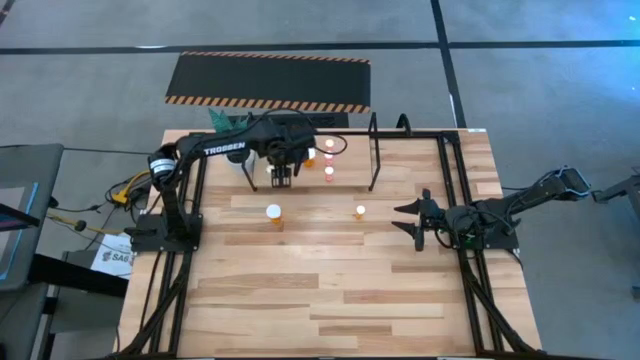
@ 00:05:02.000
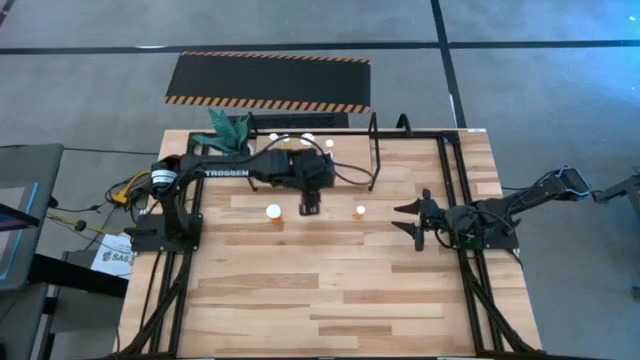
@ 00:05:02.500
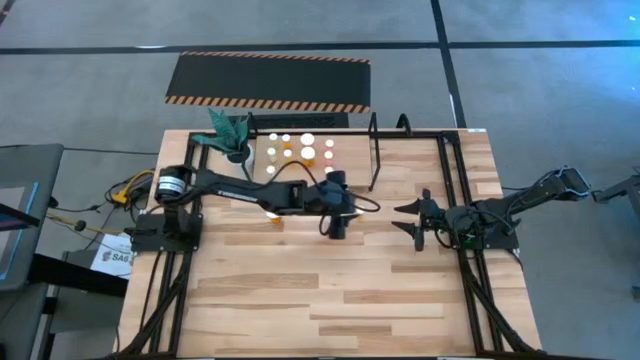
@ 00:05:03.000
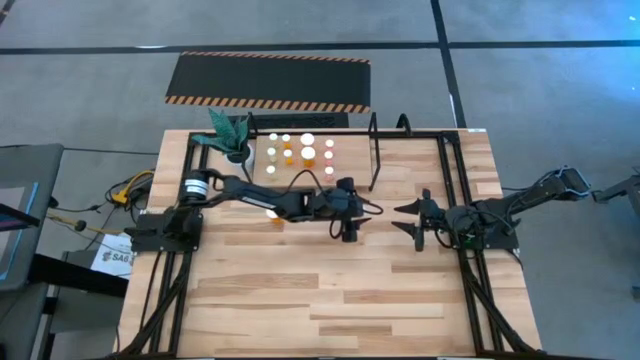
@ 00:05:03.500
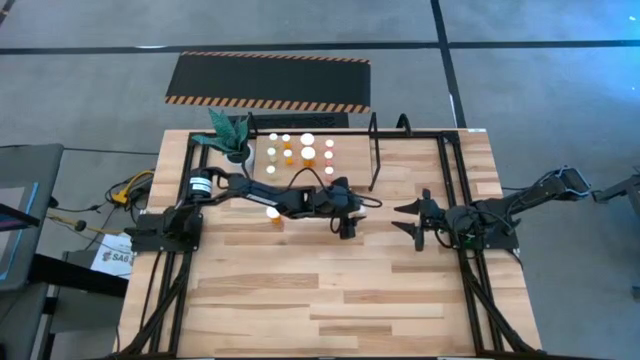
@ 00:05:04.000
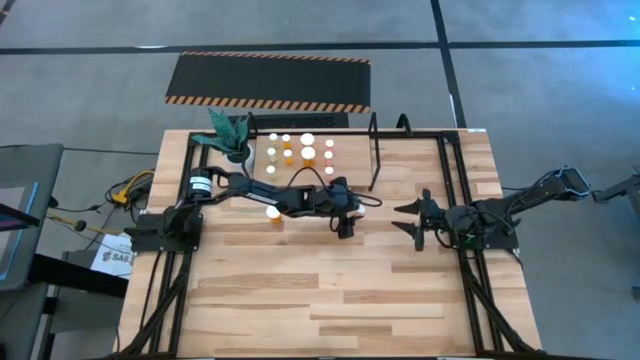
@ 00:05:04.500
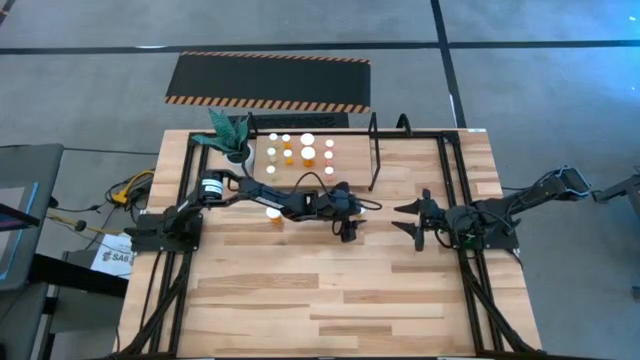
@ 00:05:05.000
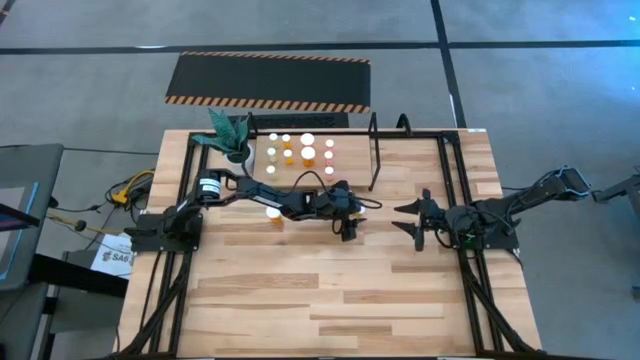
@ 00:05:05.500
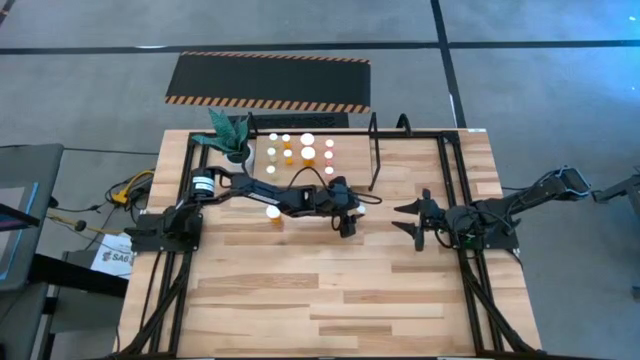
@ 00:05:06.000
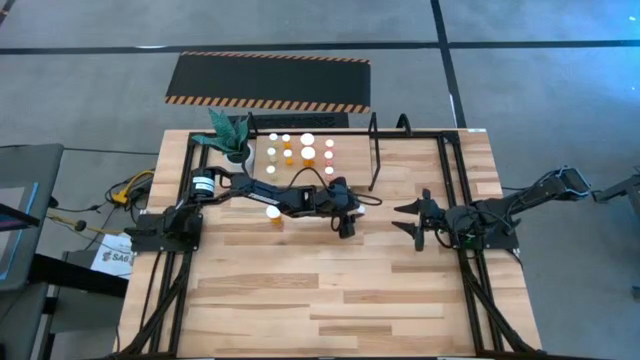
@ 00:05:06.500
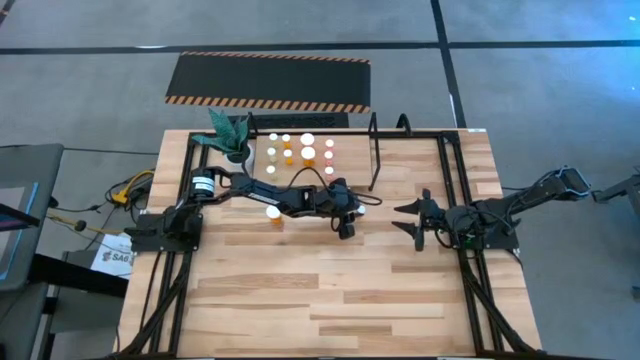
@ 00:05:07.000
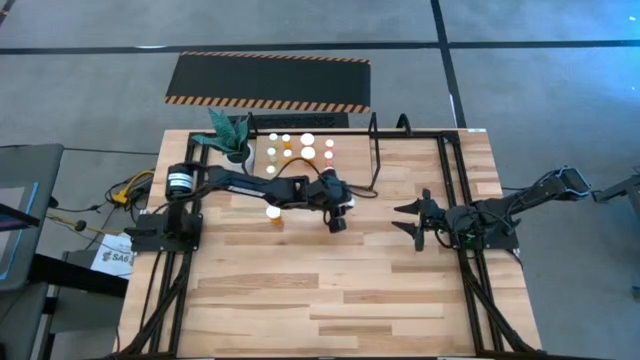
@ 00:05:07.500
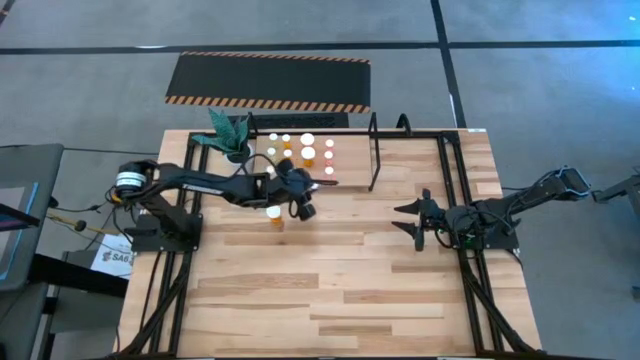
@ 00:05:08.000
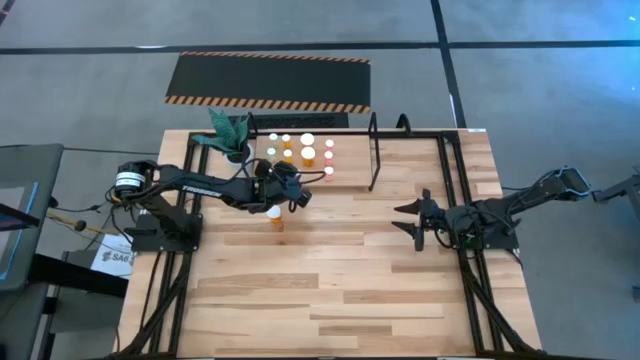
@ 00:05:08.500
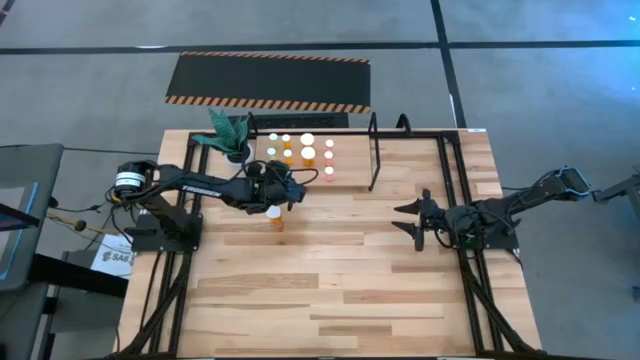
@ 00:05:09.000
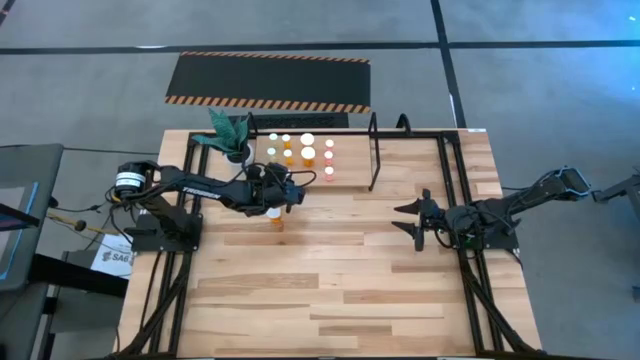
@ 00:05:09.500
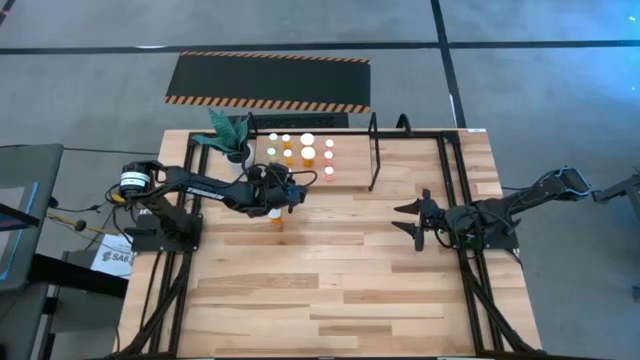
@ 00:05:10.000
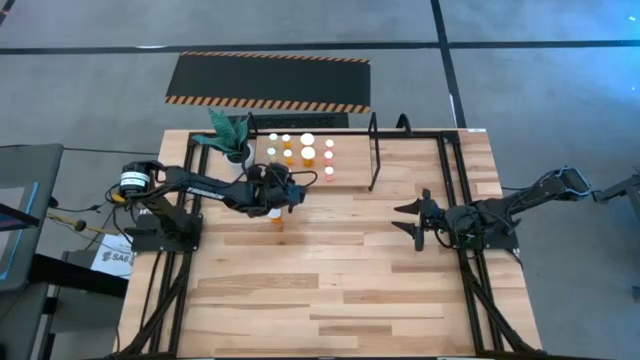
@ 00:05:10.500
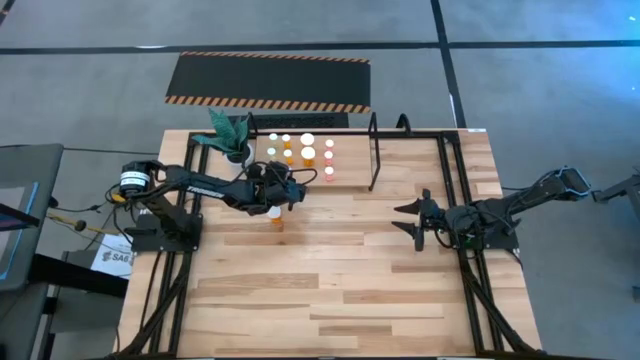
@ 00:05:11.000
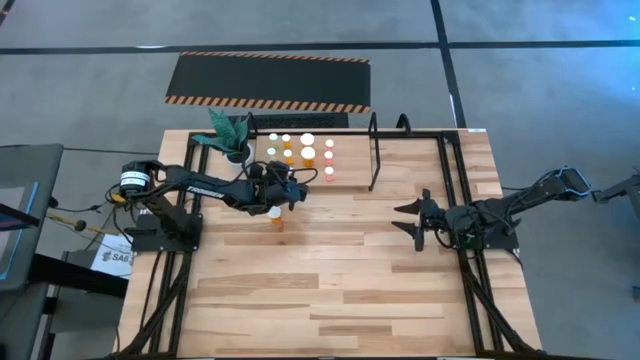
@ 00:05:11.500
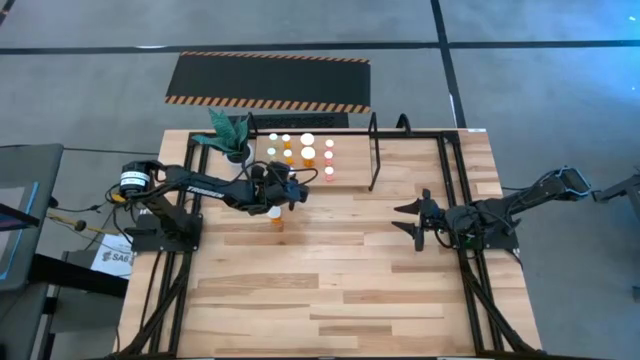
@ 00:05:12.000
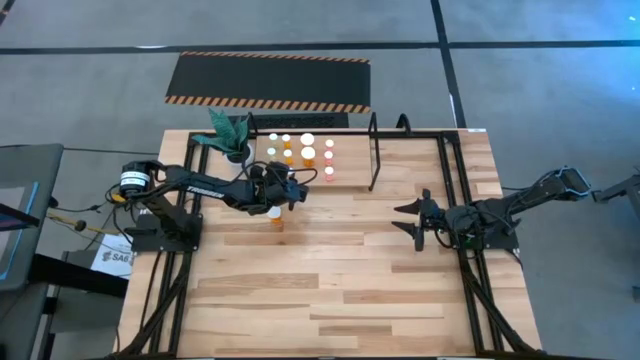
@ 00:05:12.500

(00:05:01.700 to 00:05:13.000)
Task: Pick and place medicine bottles onto shelf by color
Put the small orange pill bottle on the shelf aligned with the other small orange pill bottle

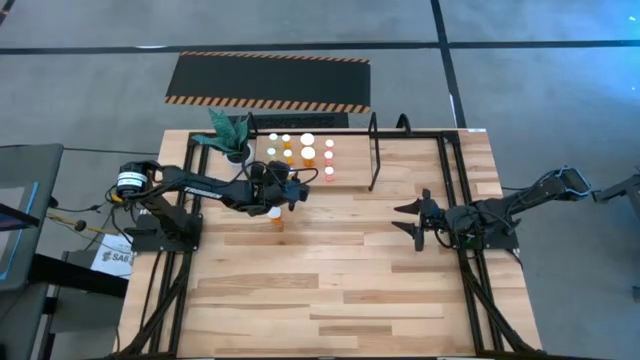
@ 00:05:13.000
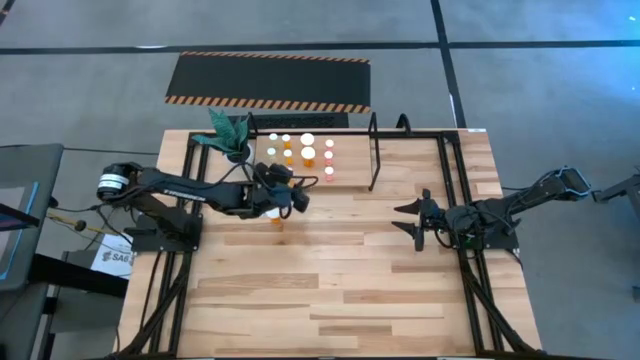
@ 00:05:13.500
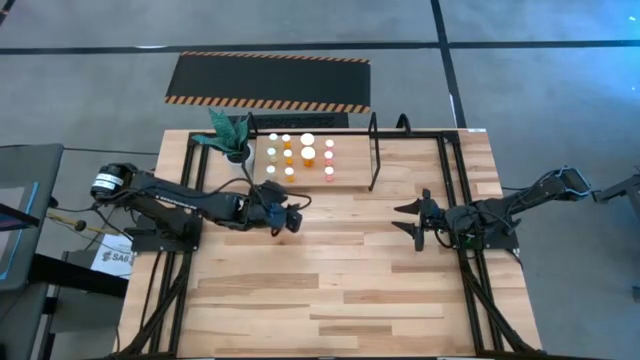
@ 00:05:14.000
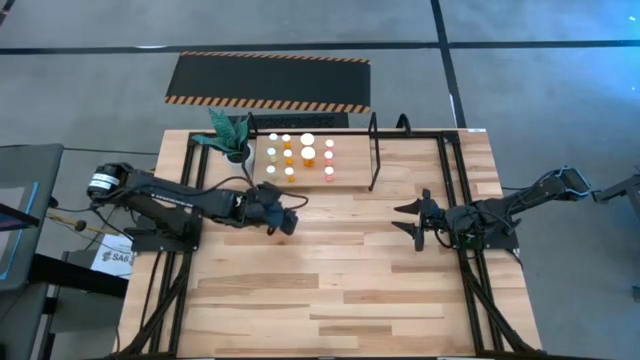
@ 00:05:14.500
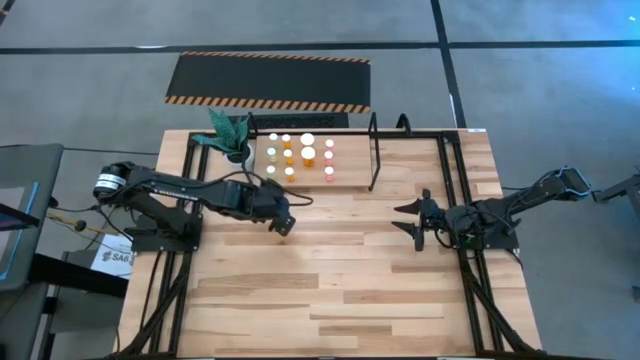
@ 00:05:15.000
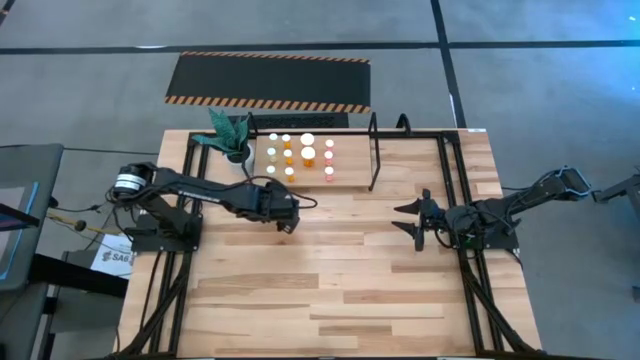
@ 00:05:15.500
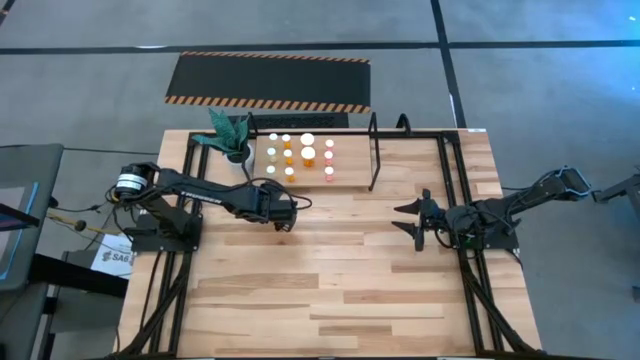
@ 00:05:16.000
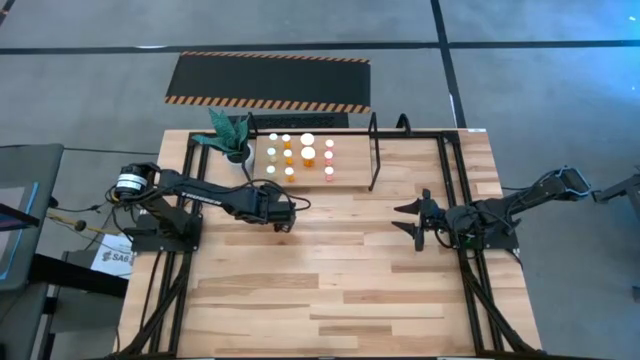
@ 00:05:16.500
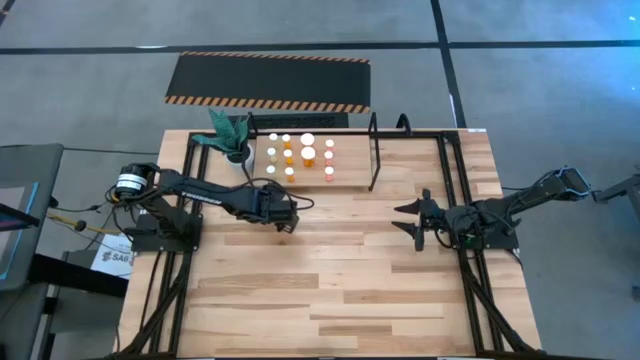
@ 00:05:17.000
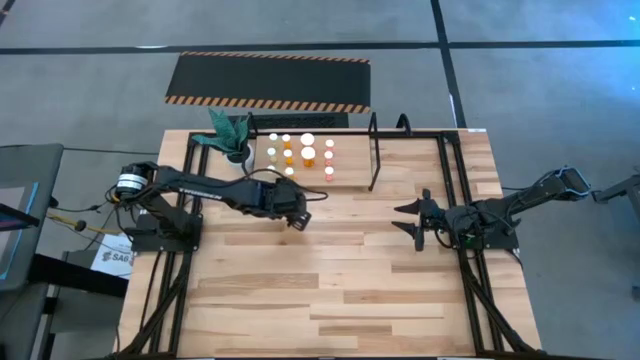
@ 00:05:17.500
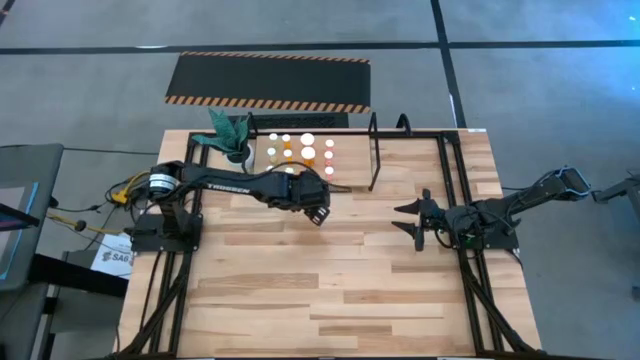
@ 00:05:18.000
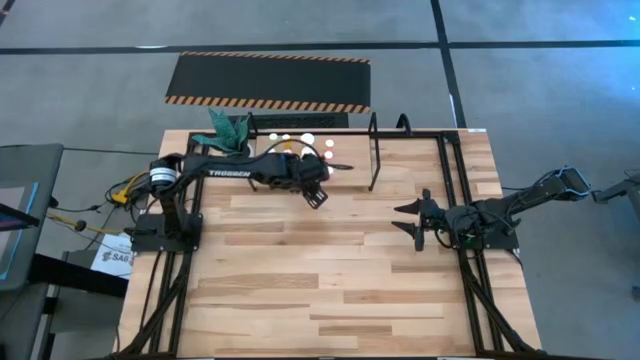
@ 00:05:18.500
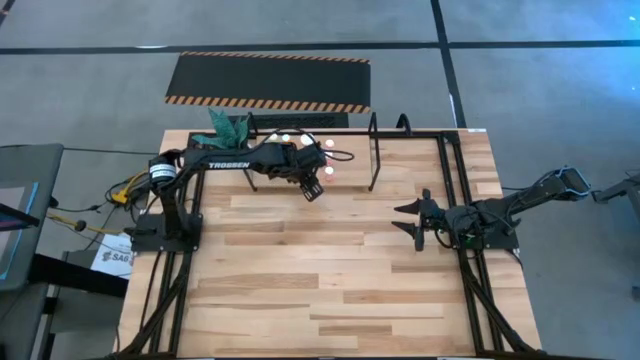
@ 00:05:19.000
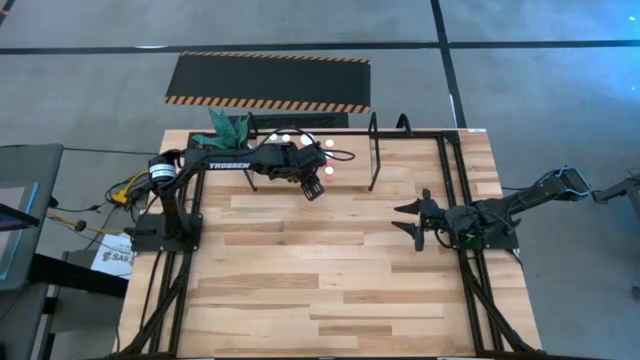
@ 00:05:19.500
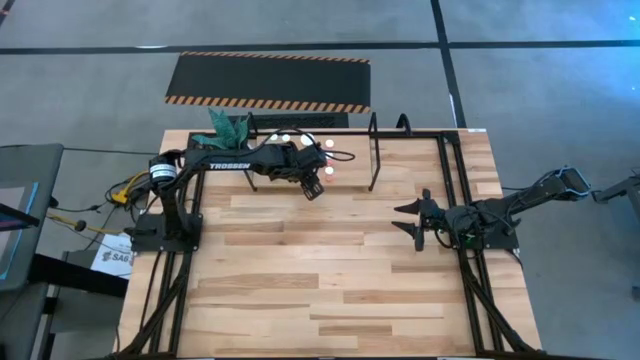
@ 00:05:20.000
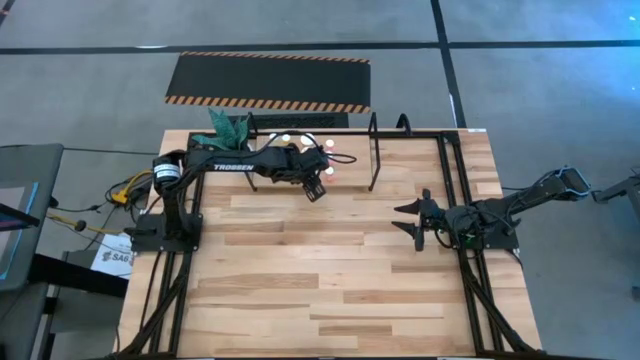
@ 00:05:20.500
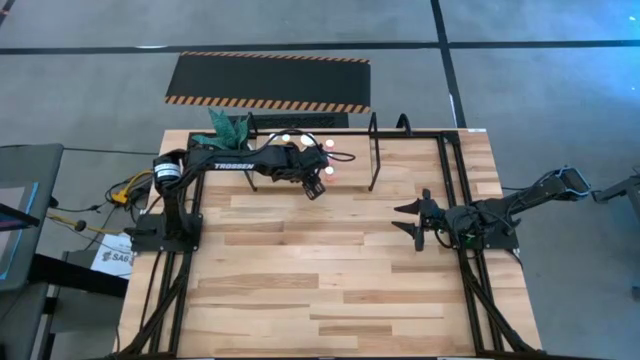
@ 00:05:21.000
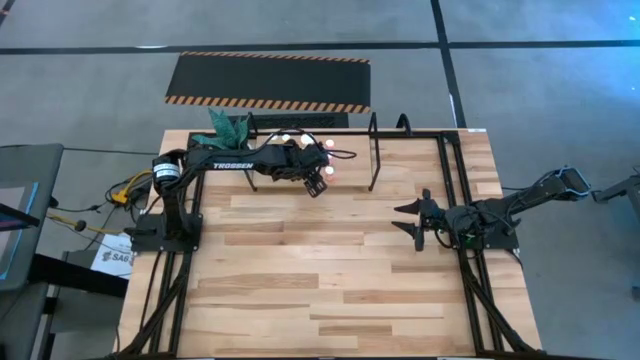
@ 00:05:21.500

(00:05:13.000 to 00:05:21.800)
Put the big orange pill bottle on the shelf aligned with the other big orange pill bottle
